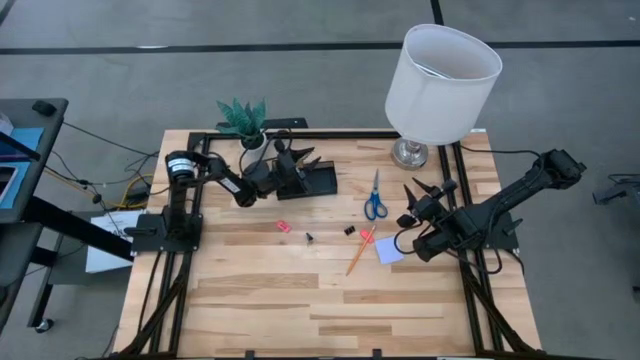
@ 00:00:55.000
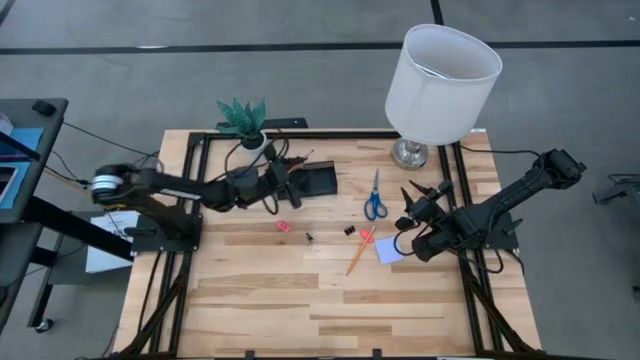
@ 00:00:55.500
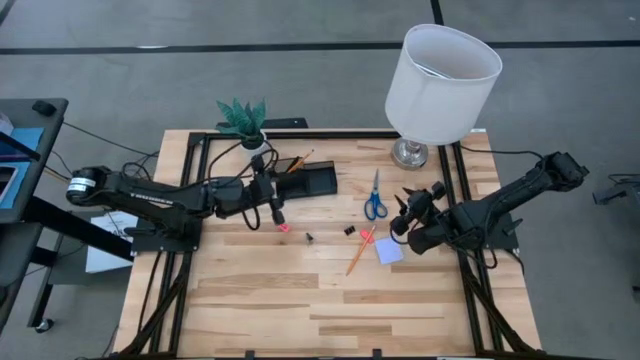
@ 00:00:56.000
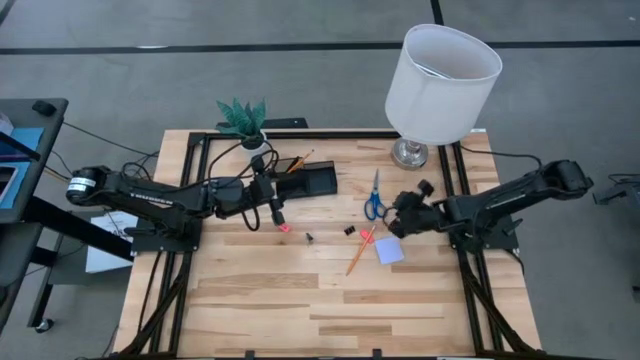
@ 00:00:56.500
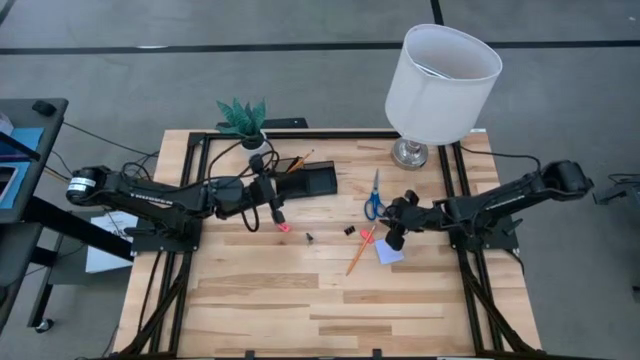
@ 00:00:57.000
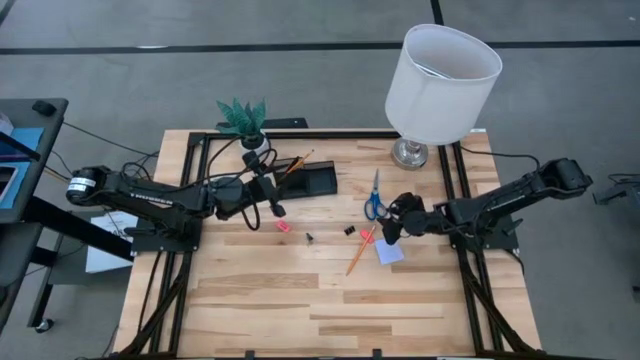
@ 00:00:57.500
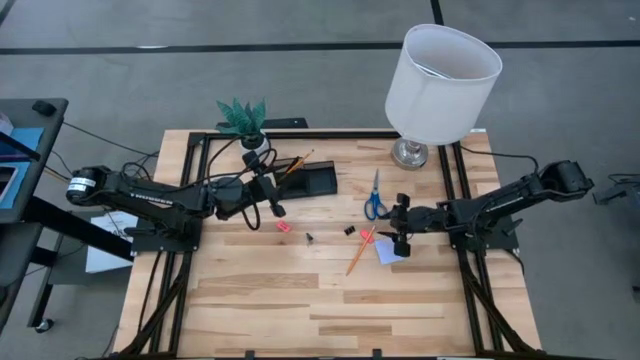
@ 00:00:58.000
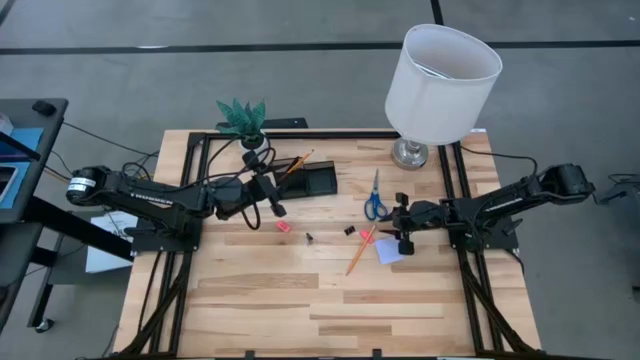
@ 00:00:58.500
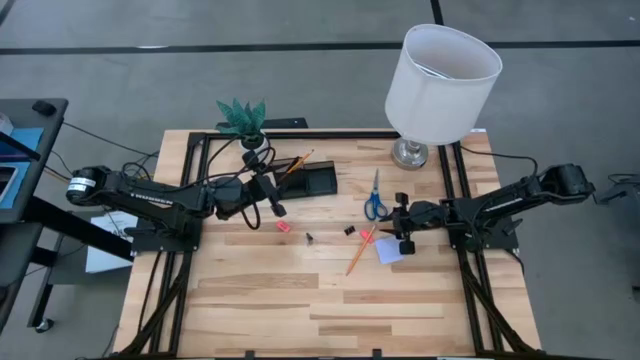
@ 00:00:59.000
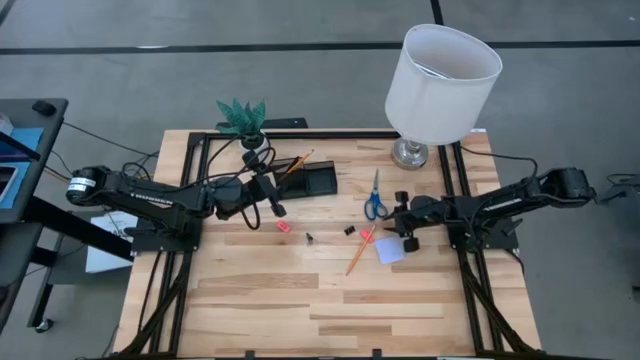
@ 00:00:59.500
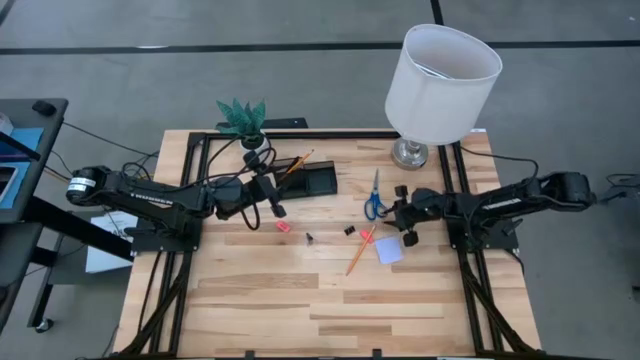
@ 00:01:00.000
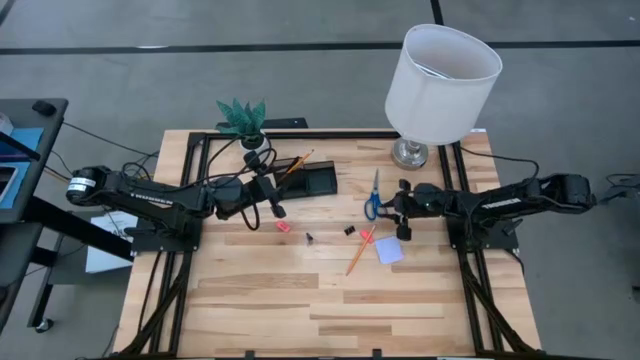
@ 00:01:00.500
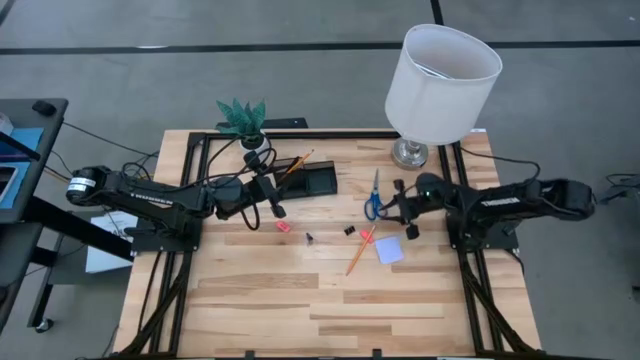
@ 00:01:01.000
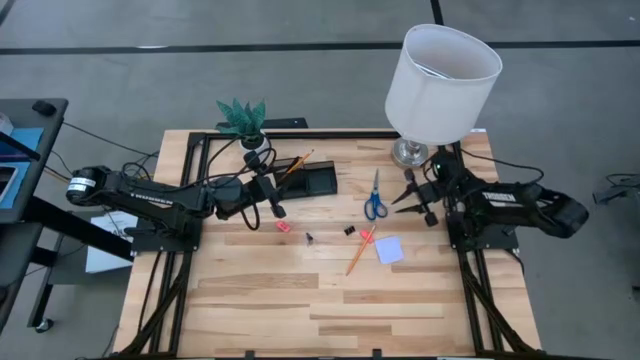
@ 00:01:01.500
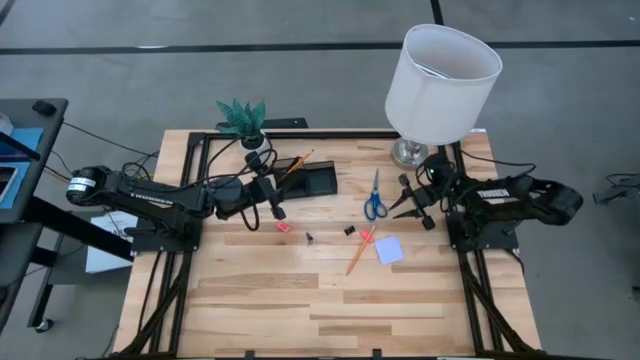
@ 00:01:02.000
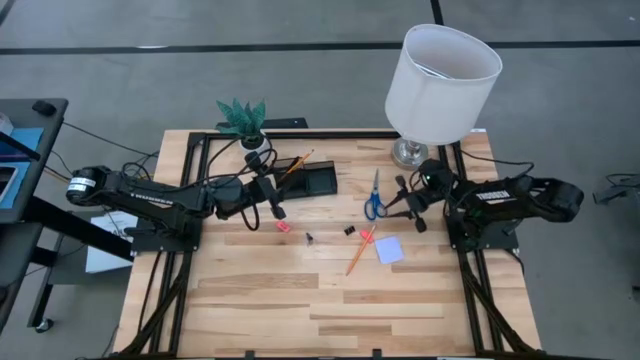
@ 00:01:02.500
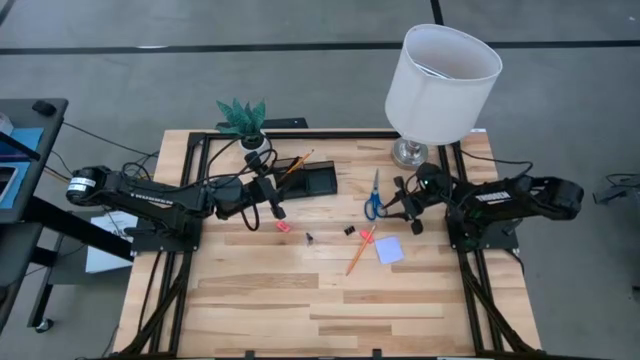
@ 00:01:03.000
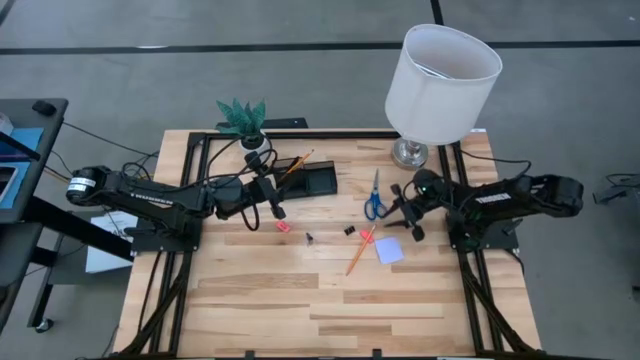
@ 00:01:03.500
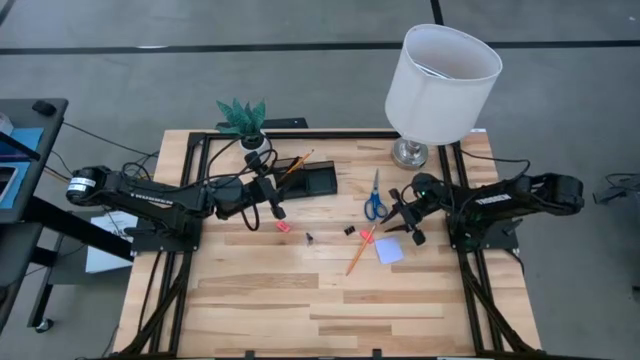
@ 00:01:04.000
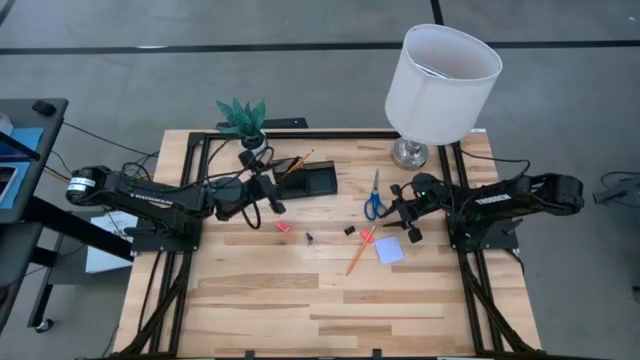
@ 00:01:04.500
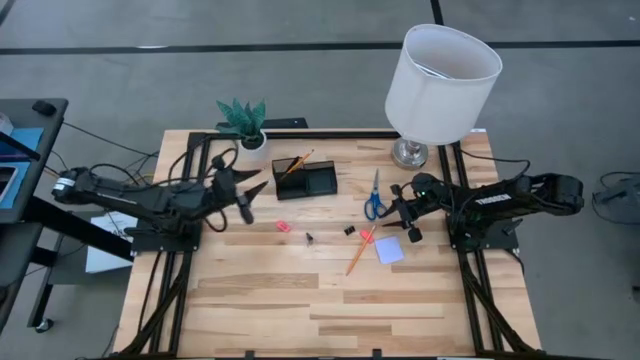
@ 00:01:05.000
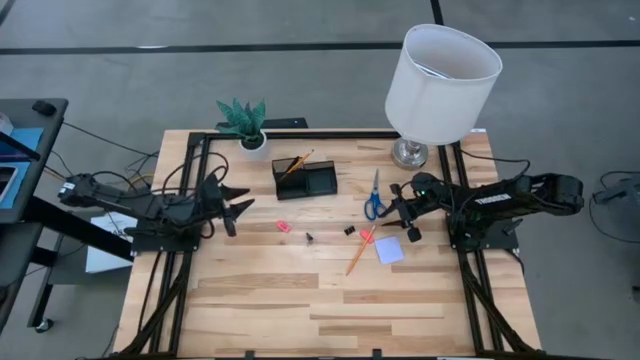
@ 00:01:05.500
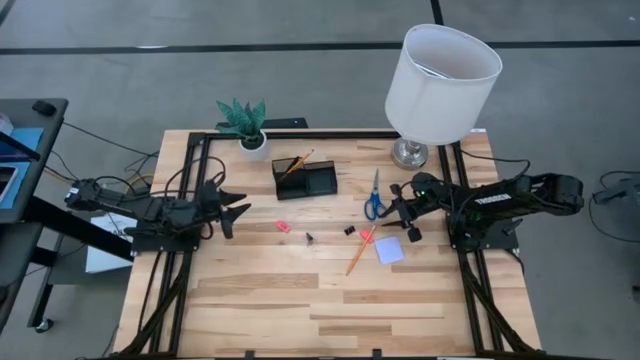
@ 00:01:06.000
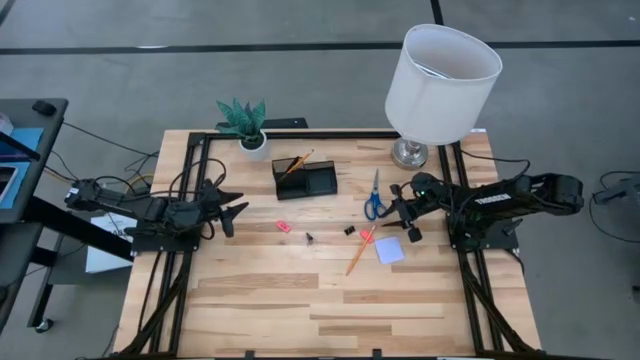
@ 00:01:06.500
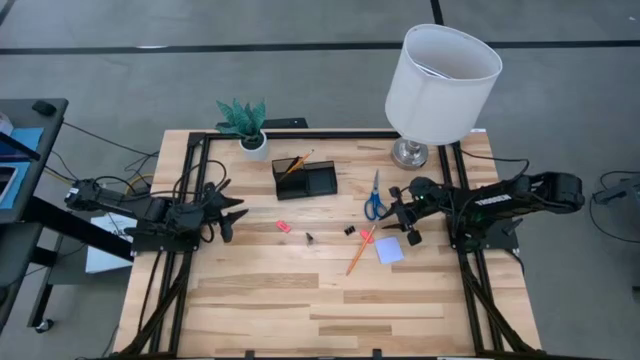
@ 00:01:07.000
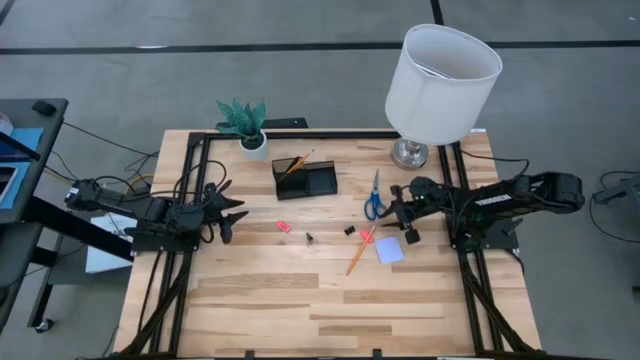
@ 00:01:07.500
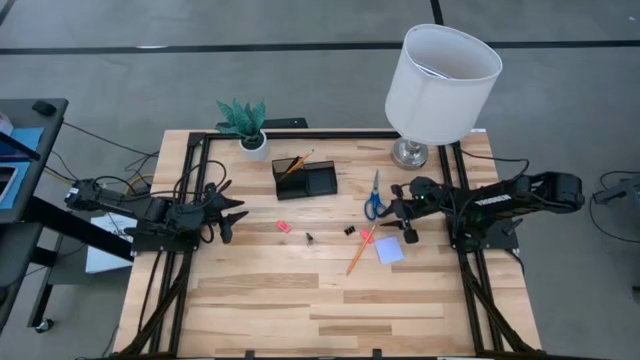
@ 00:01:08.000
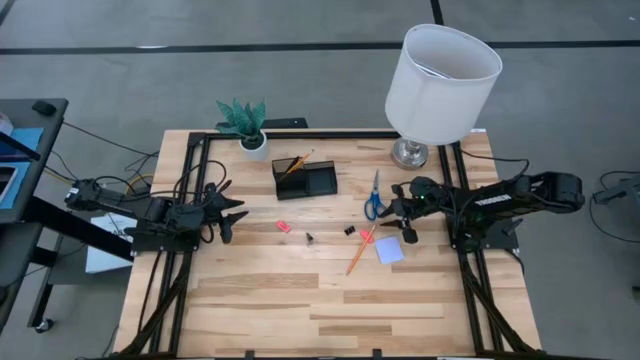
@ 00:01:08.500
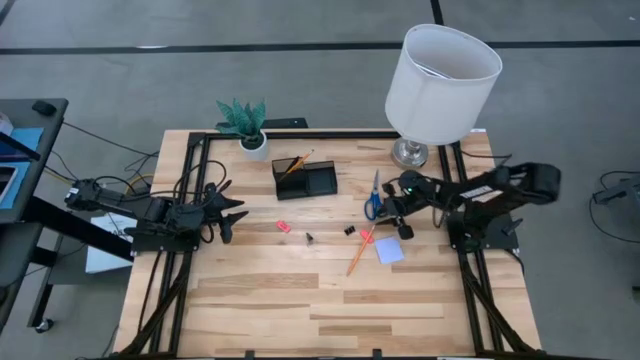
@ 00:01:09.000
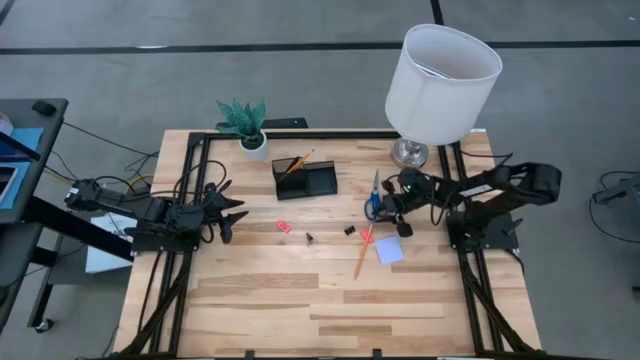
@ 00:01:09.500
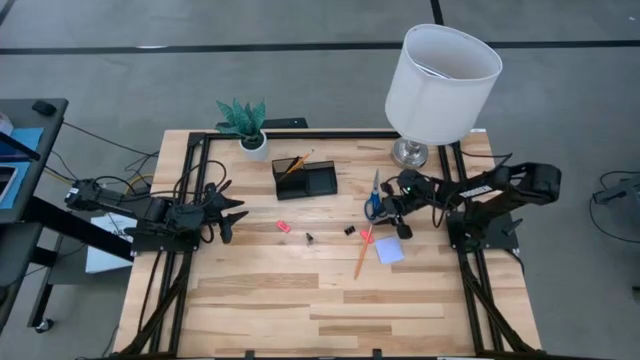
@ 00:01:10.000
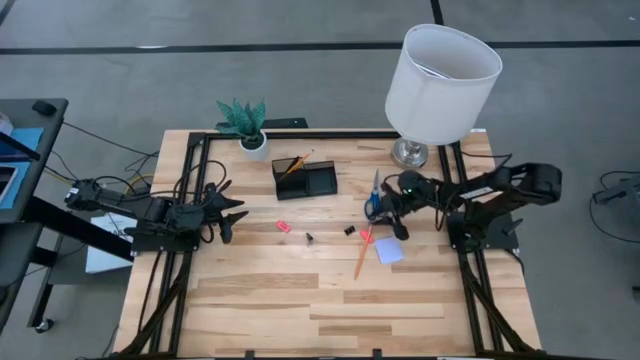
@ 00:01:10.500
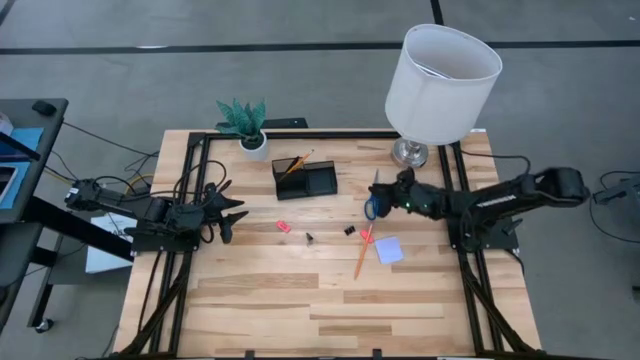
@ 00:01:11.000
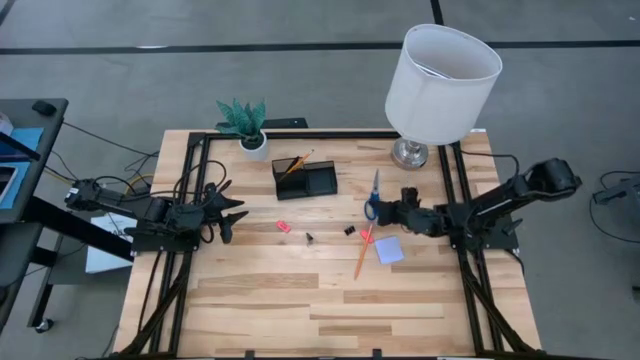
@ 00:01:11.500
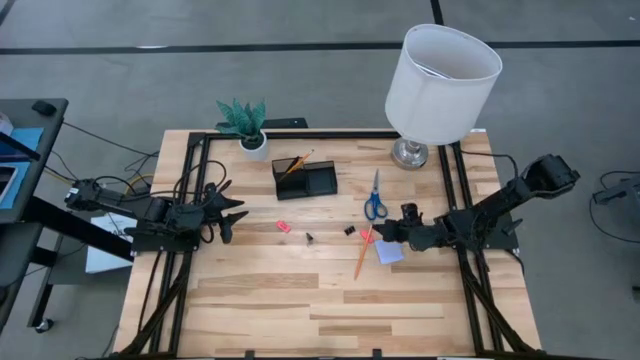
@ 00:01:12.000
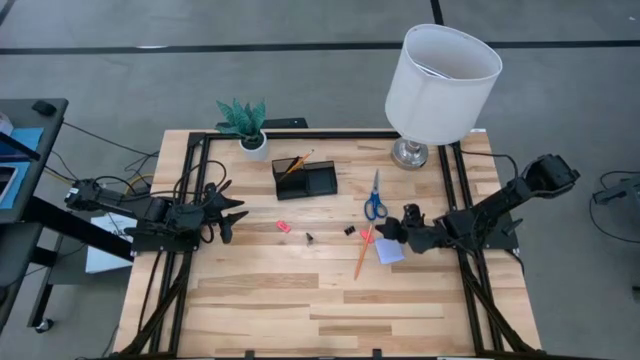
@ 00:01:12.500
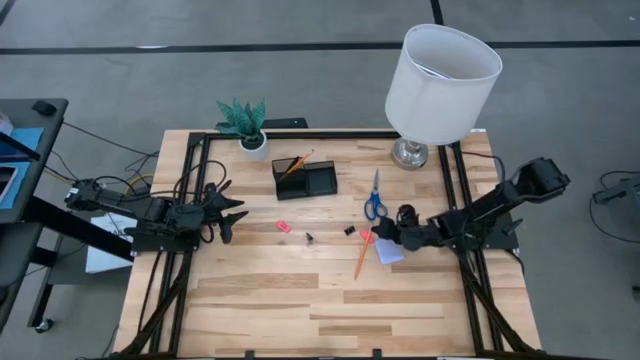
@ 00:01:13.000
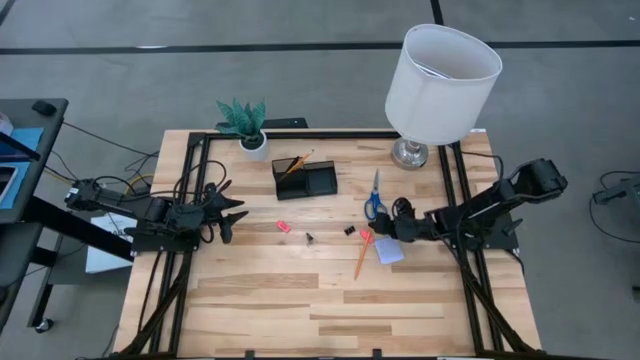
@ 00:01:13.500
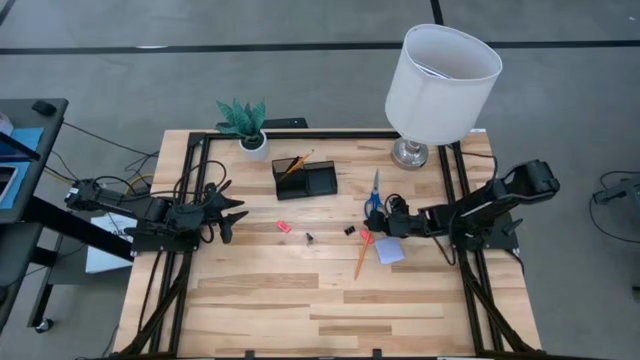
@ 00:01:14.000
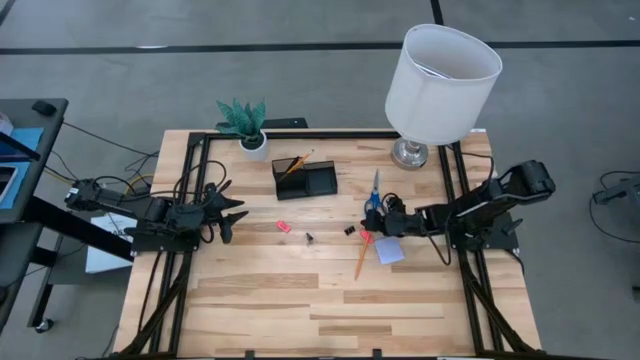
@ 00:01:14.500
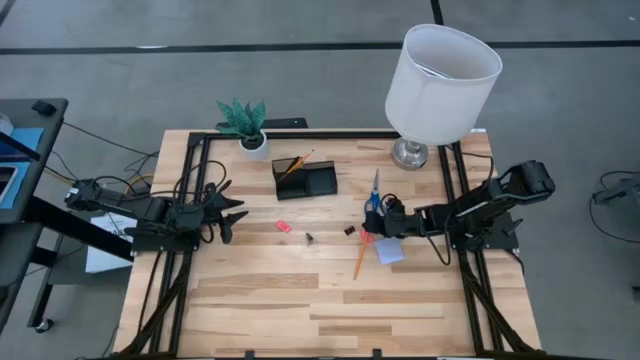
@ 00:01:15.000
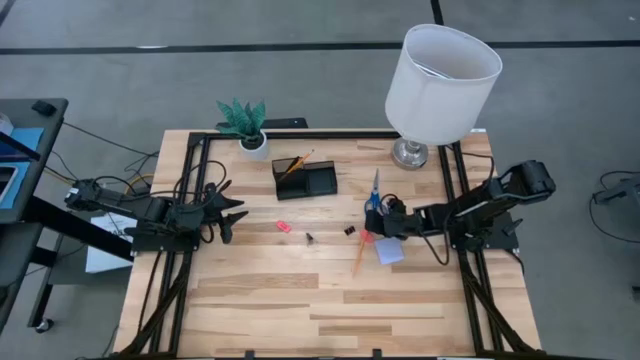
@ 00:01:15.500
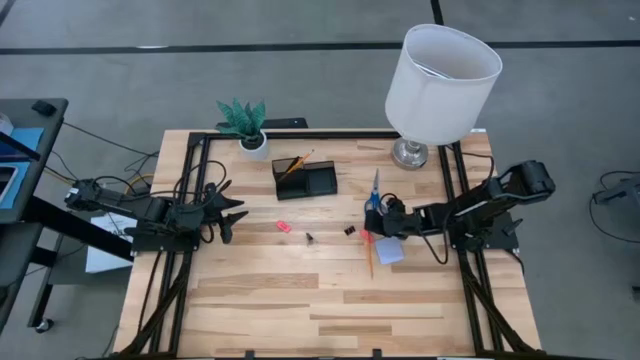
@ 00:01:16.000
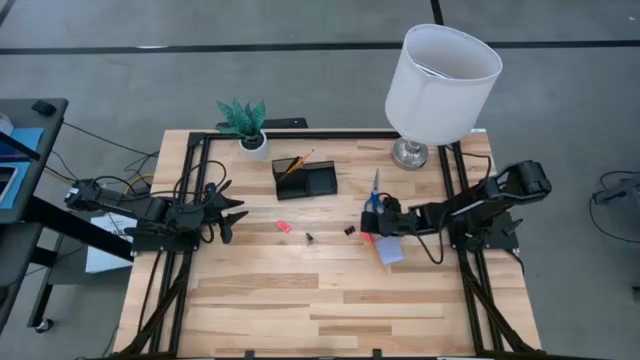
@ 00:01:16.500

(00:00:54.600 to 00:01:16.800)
Task: Pick and place office supplies into organizer
Put the yellow pencil into the black desk organizer
